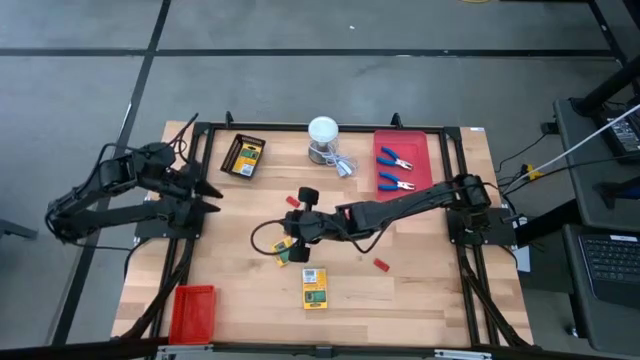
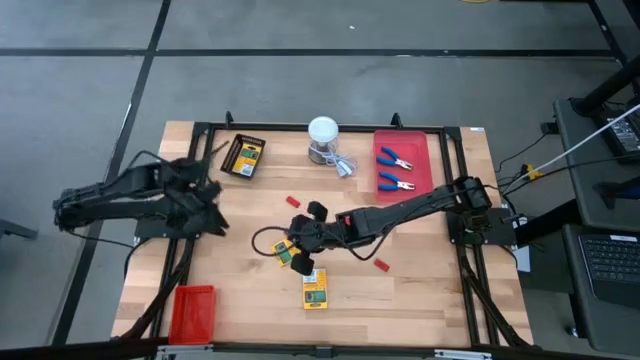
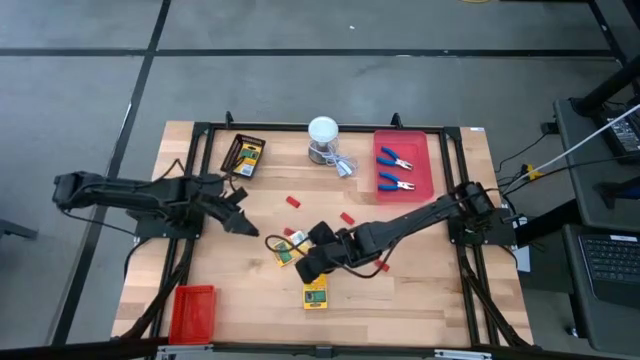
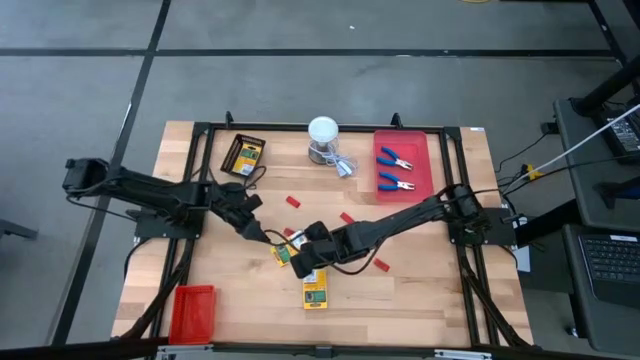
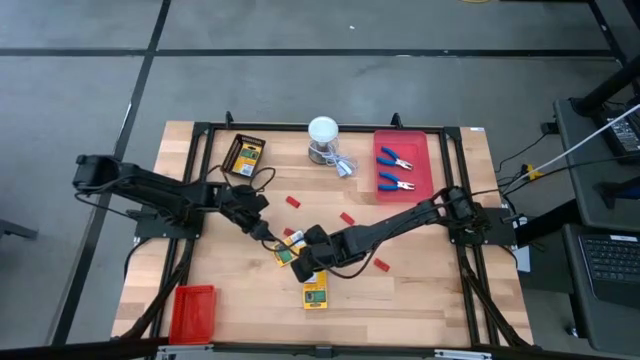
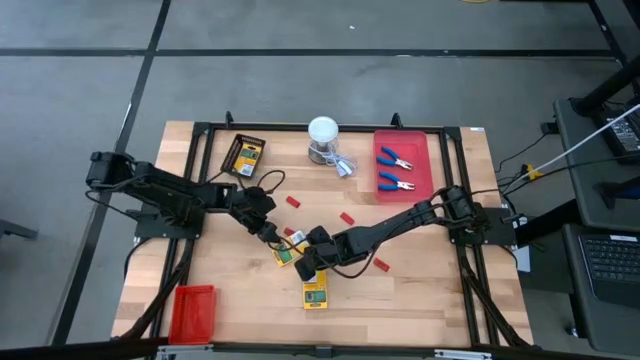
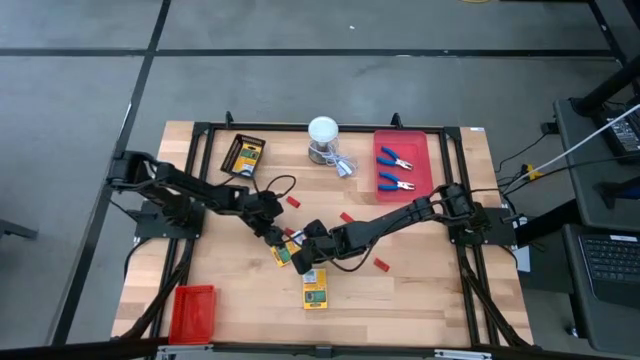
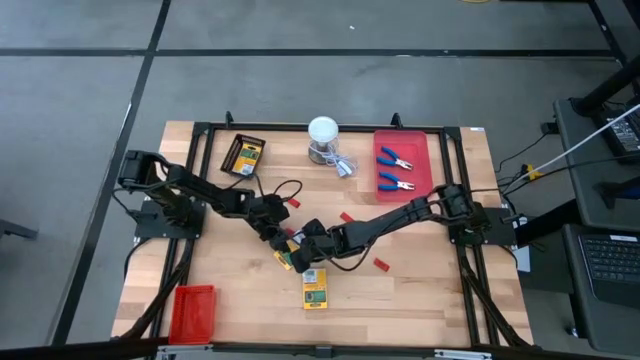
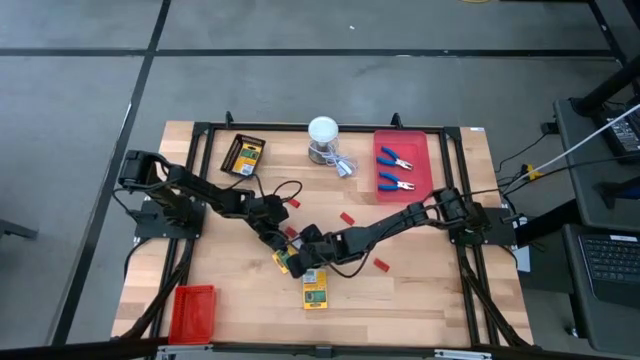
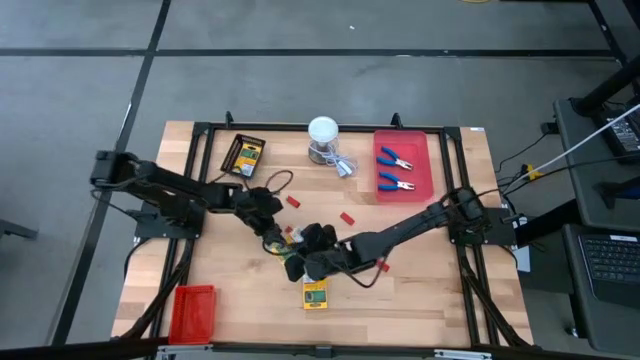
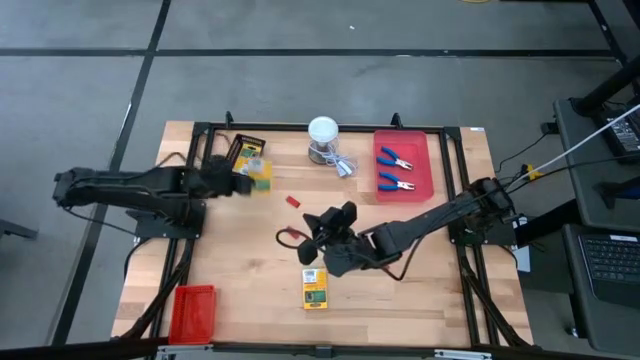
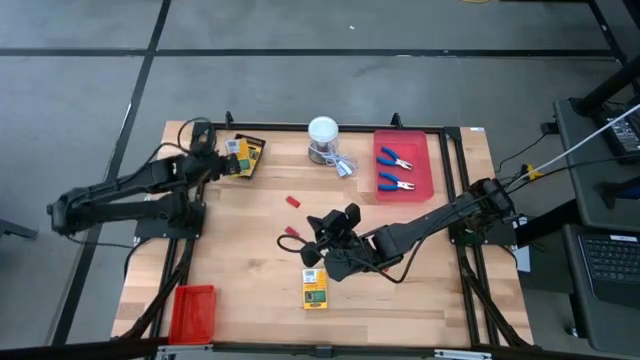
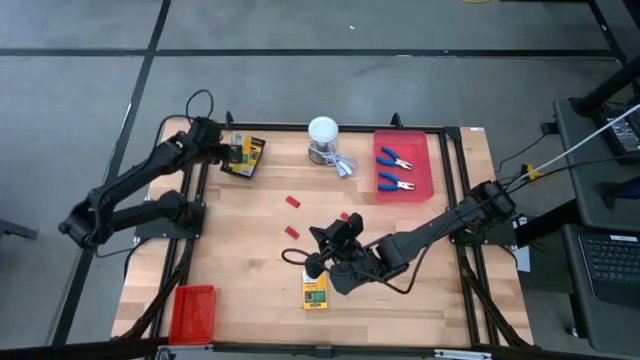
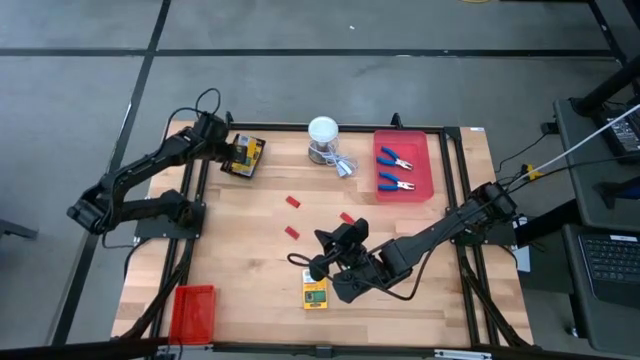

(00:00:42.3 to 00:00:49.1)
Task: Pick & Place School Supplies
Put the crayon box into the black bin

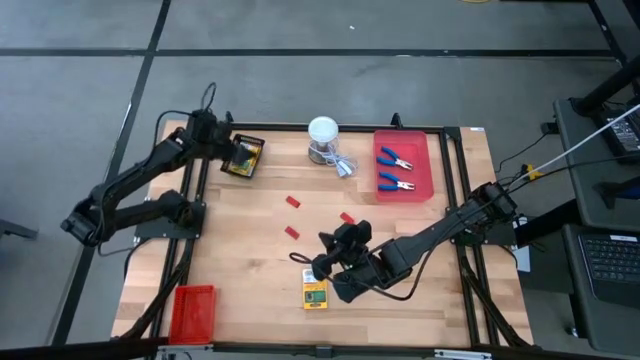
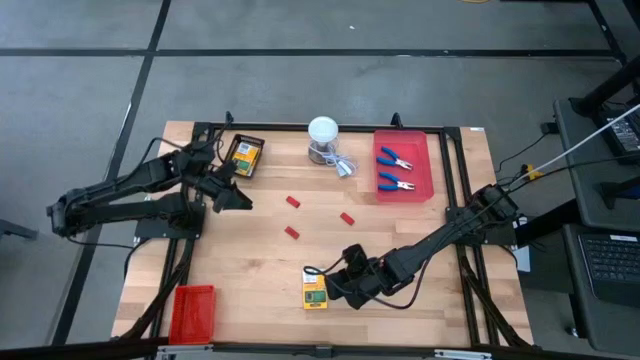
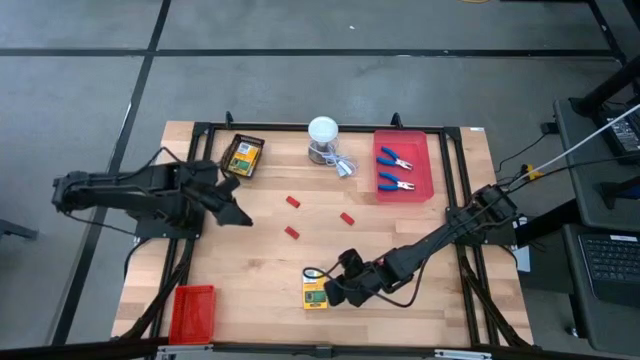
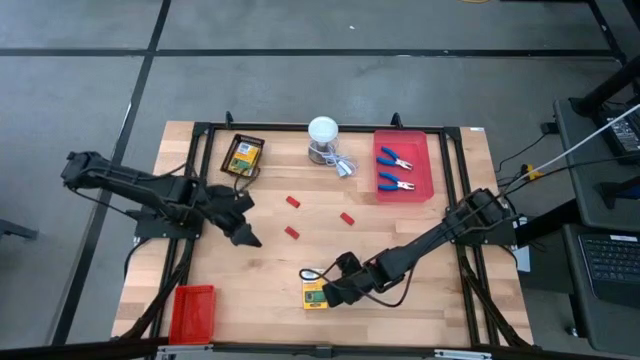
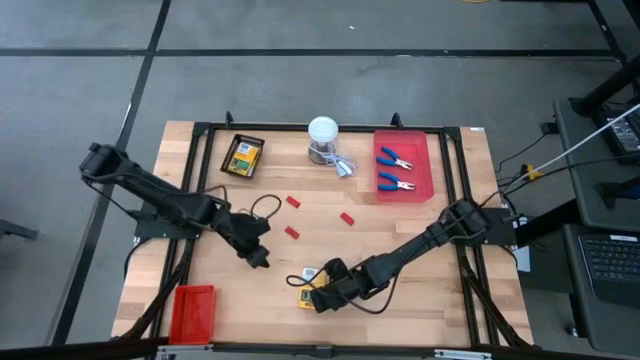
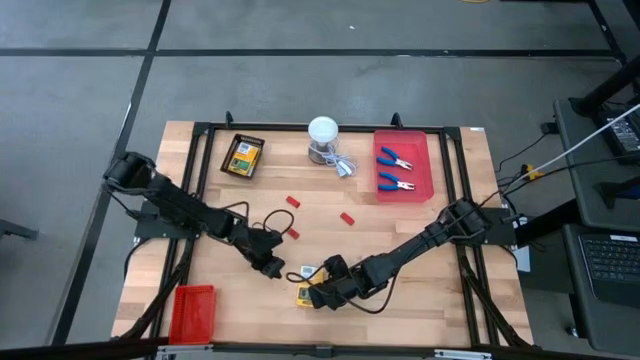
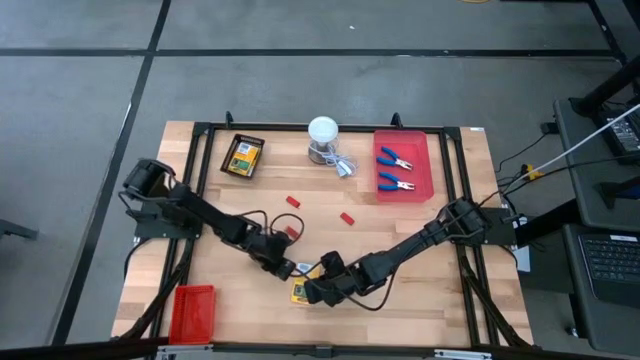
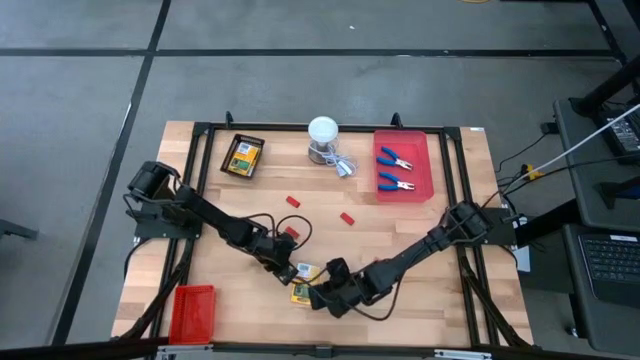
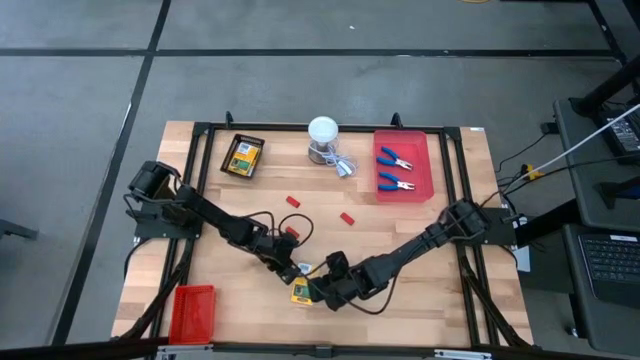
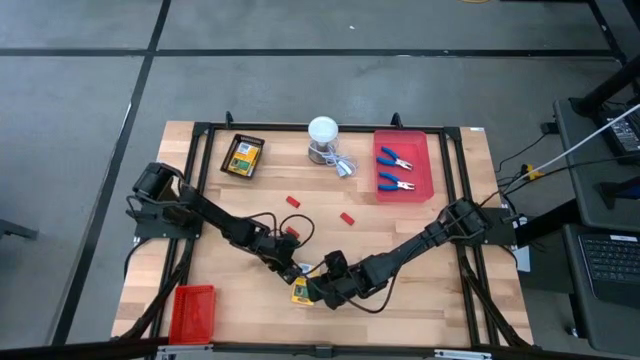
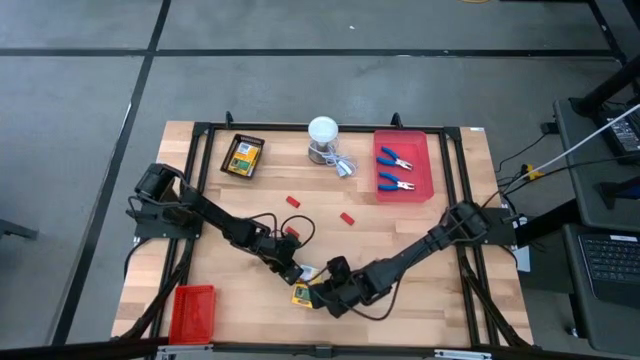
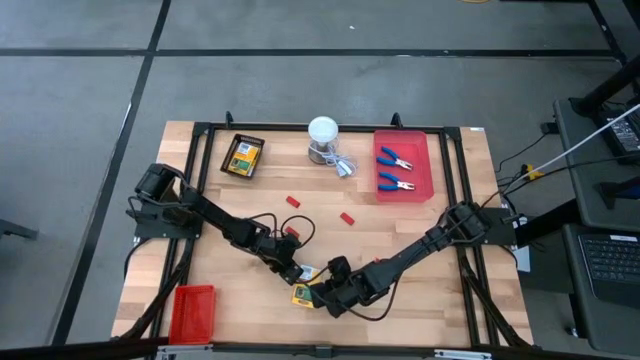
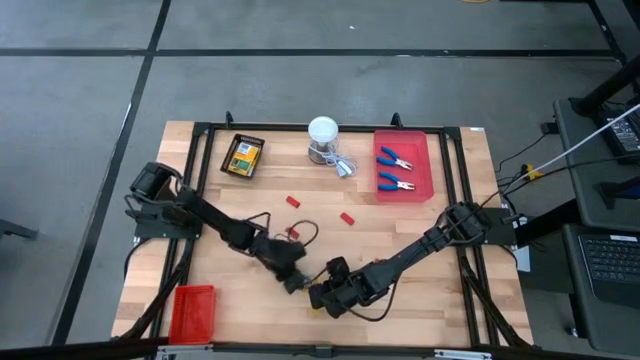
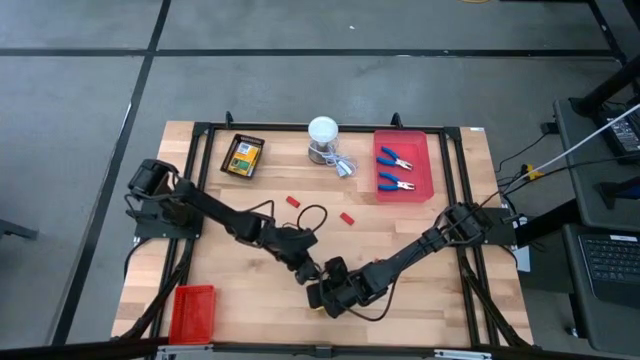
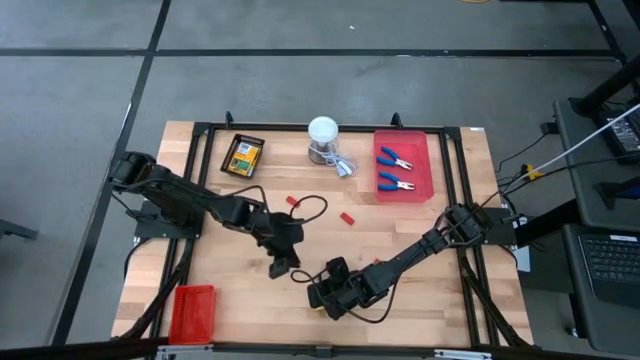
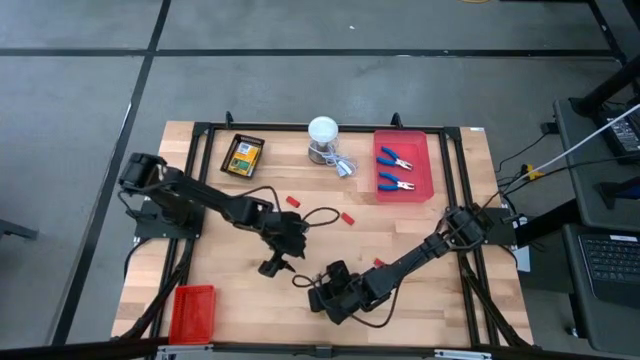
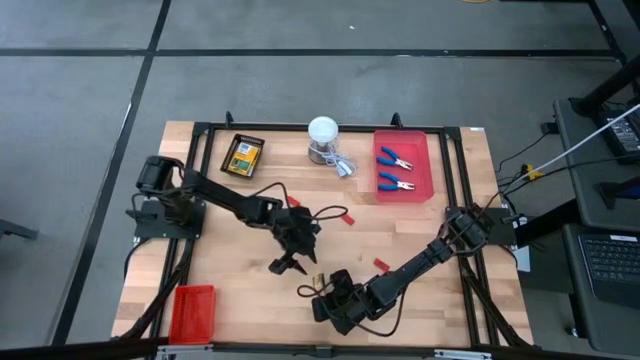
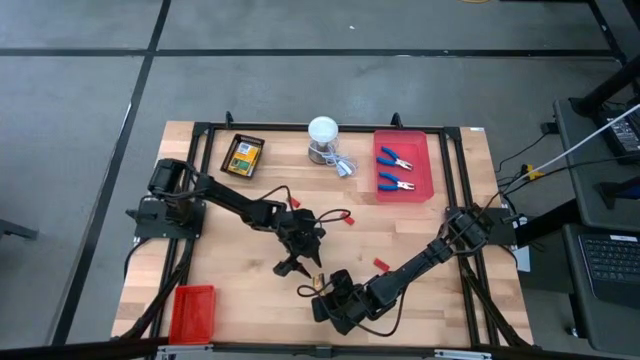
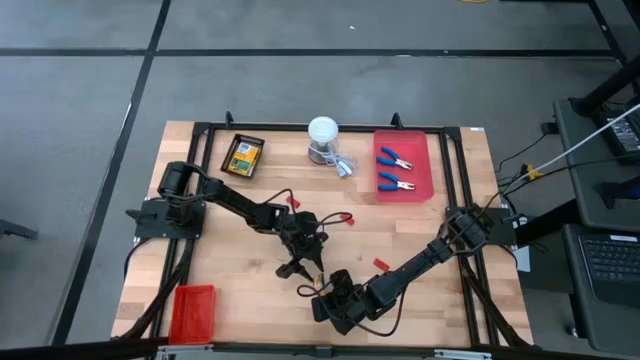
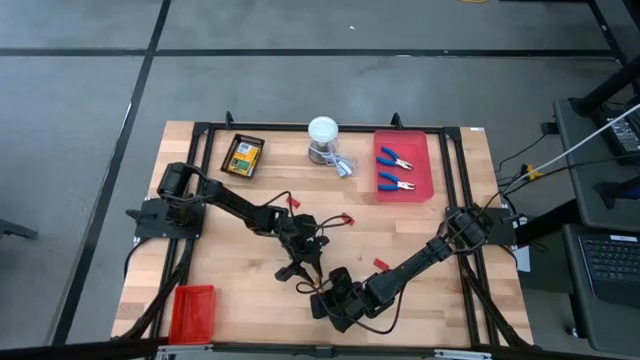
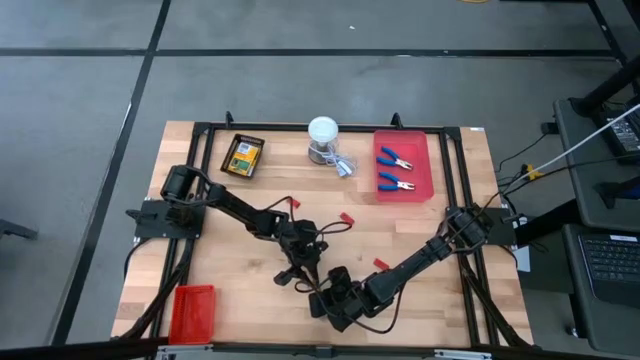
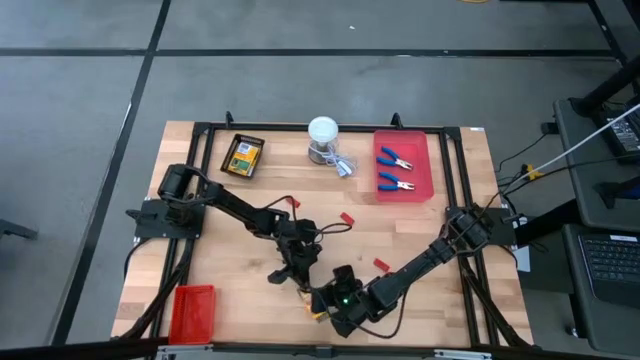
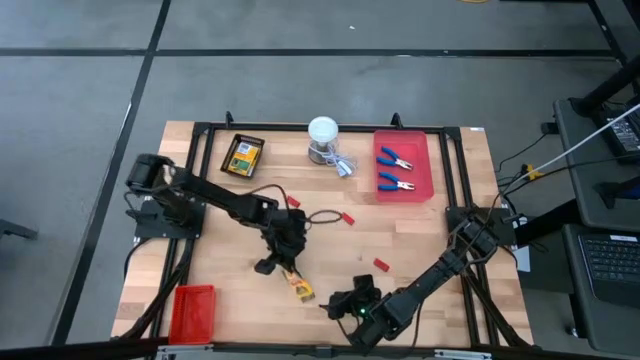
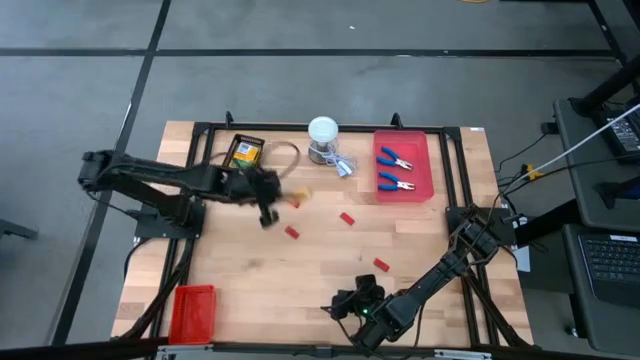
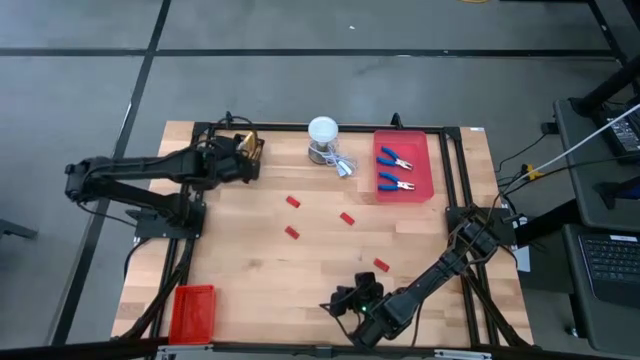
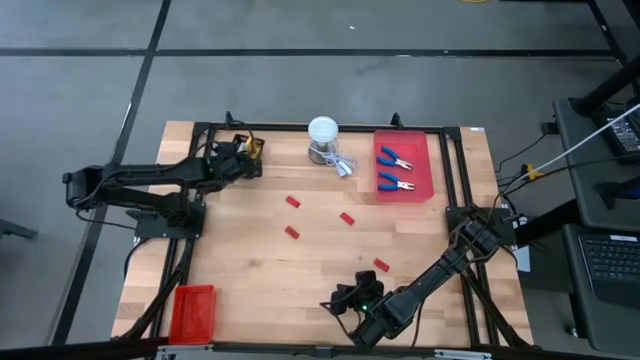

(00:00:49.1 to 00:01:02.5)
Put the crayon box into the black bin

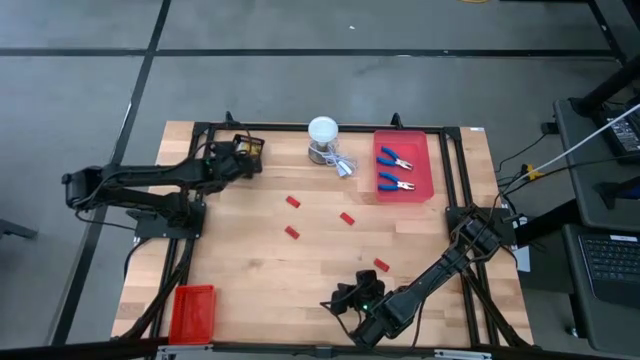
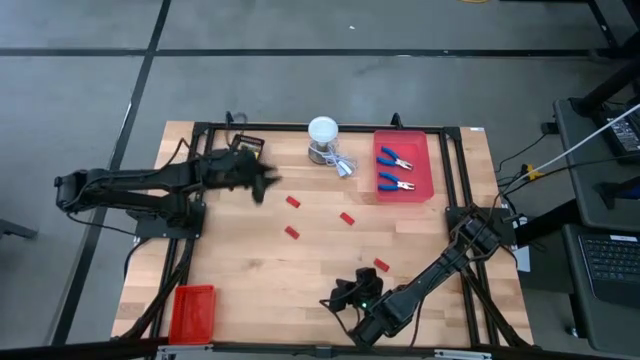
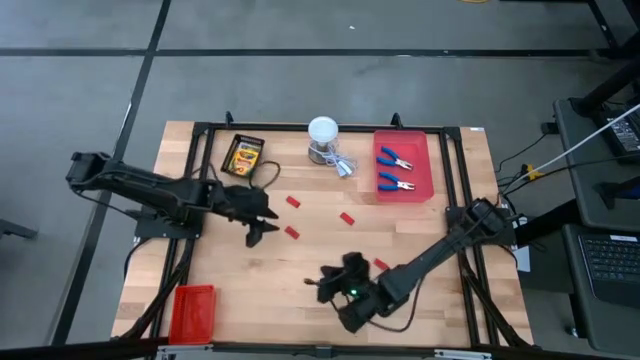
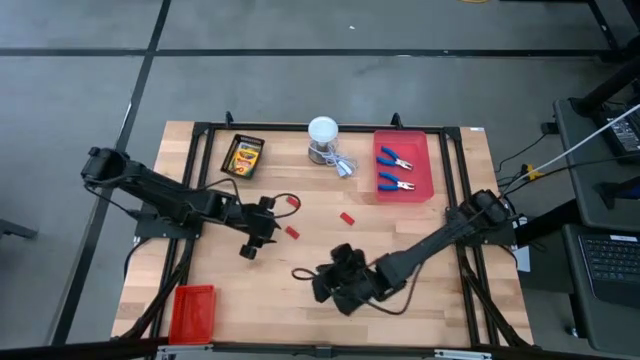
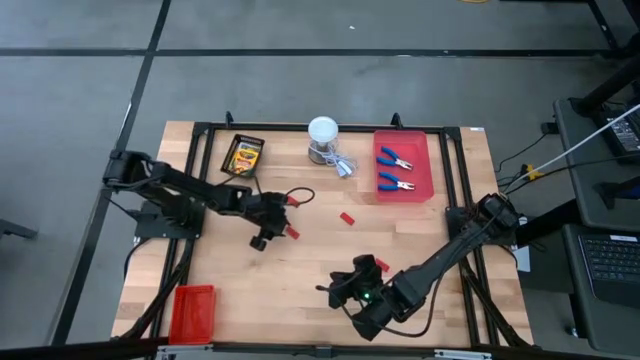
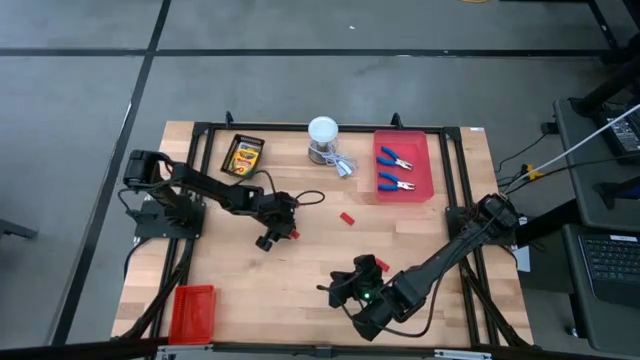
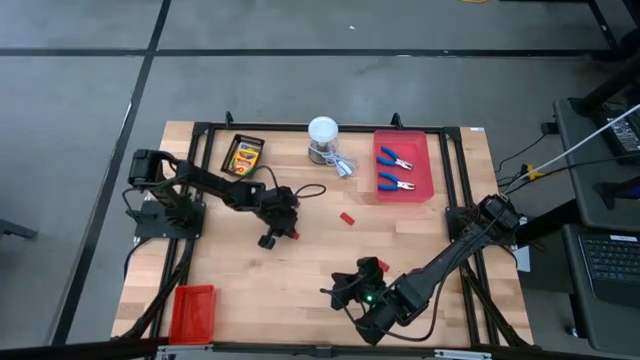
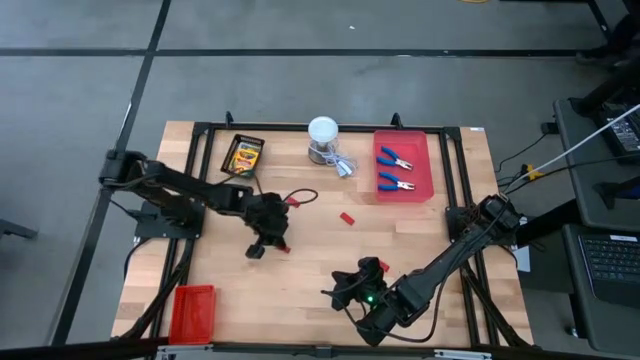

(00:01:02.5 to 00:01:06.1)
Put the red eraser into the red bin
